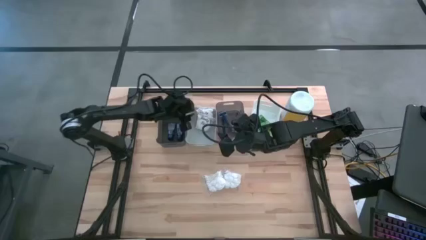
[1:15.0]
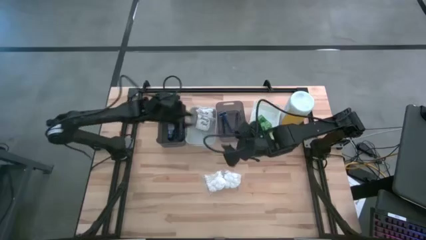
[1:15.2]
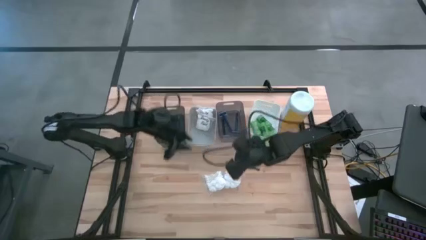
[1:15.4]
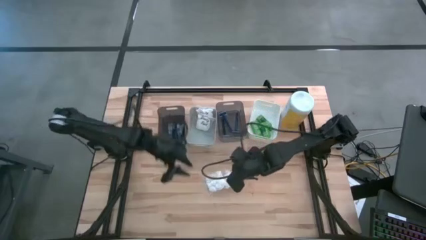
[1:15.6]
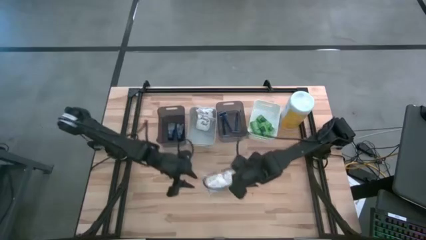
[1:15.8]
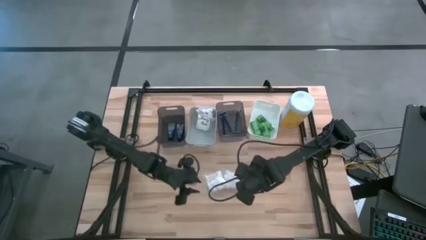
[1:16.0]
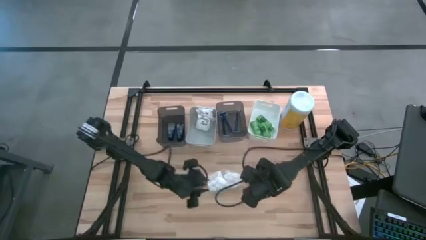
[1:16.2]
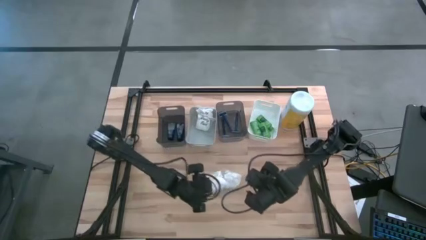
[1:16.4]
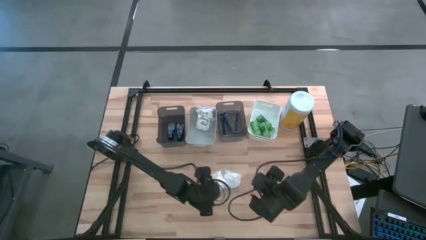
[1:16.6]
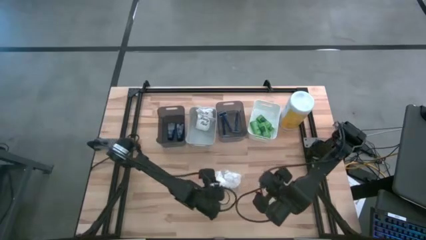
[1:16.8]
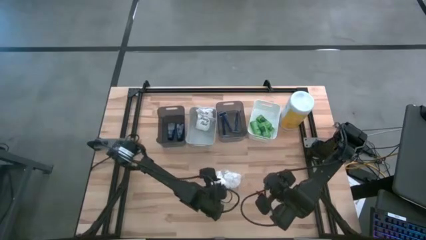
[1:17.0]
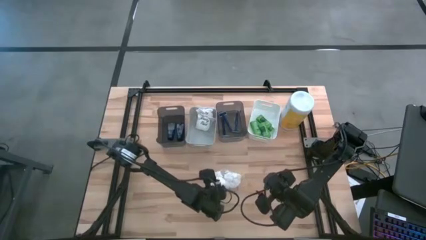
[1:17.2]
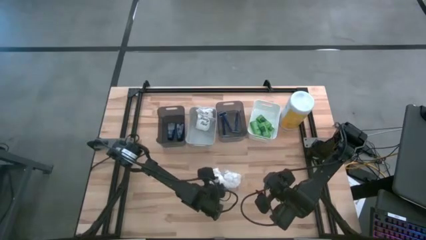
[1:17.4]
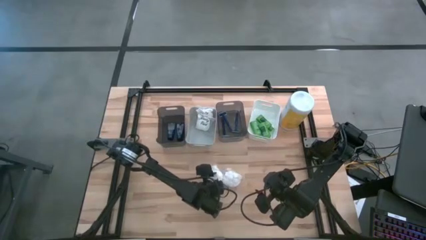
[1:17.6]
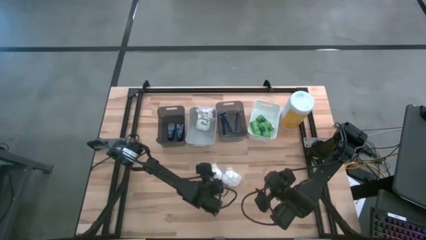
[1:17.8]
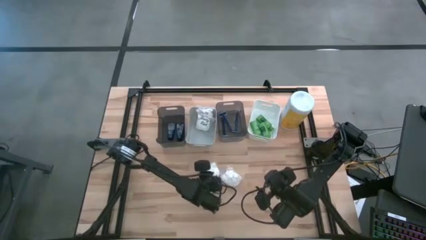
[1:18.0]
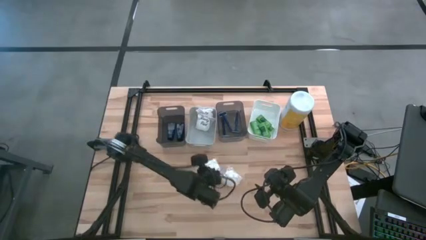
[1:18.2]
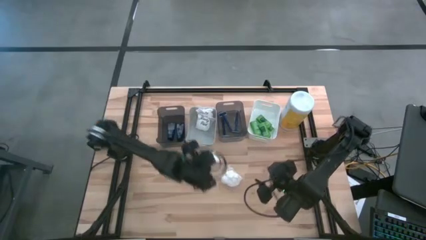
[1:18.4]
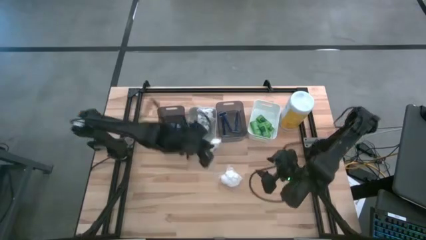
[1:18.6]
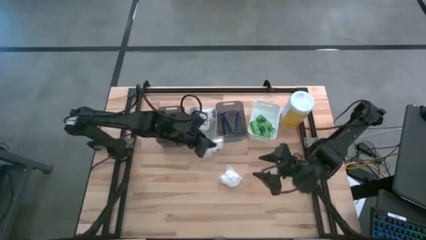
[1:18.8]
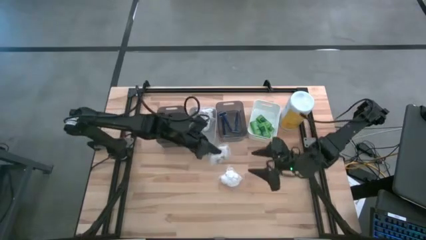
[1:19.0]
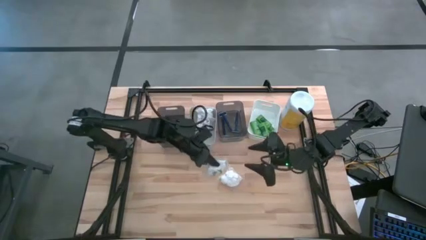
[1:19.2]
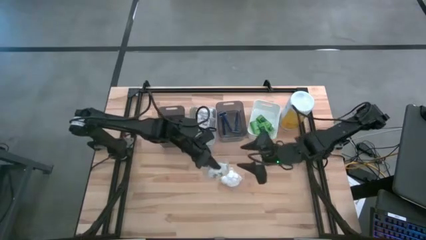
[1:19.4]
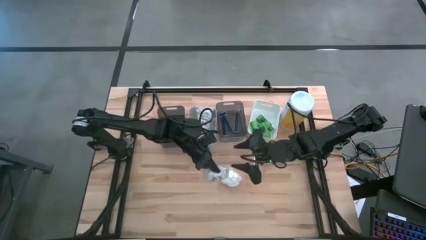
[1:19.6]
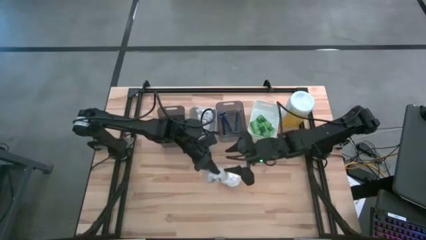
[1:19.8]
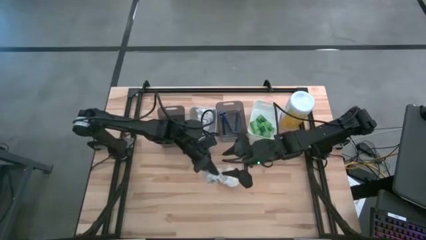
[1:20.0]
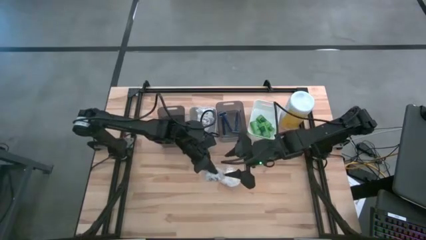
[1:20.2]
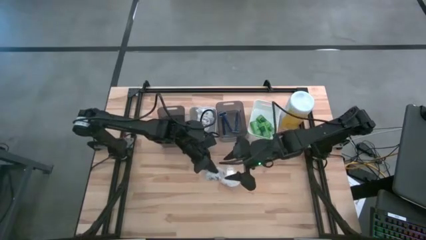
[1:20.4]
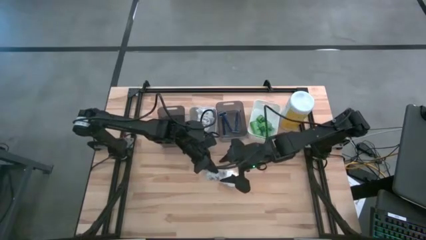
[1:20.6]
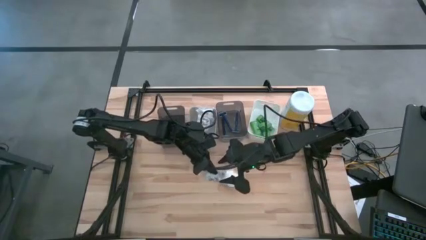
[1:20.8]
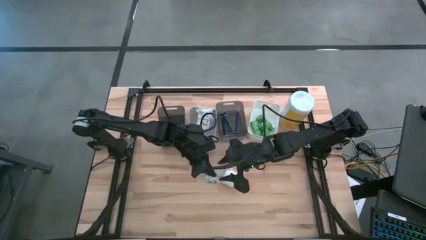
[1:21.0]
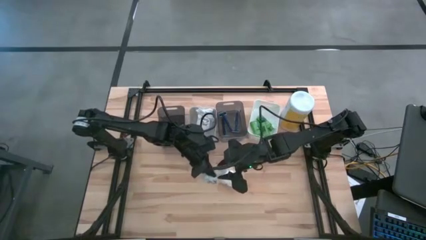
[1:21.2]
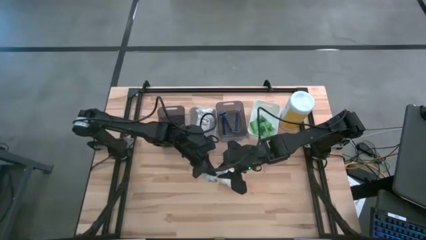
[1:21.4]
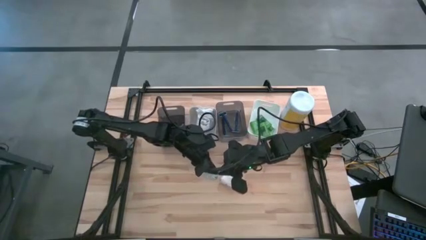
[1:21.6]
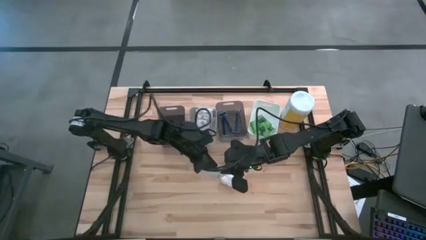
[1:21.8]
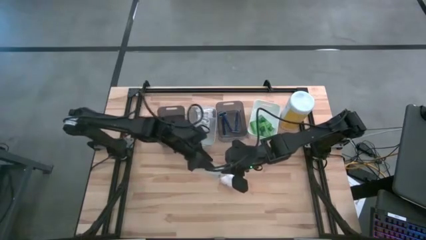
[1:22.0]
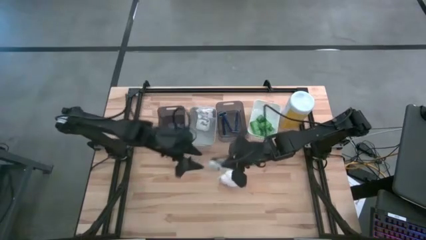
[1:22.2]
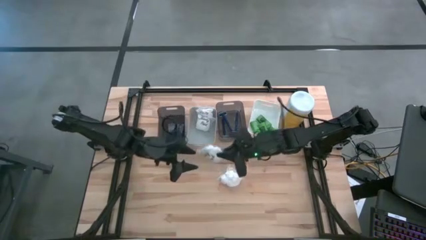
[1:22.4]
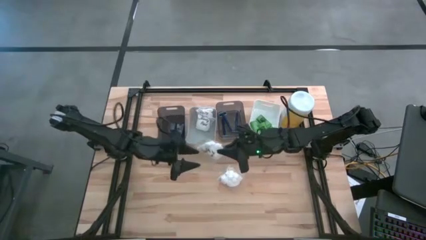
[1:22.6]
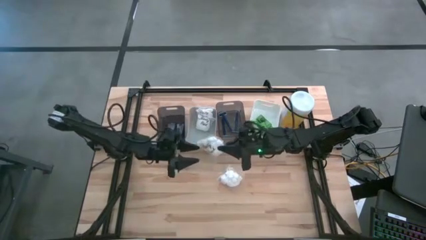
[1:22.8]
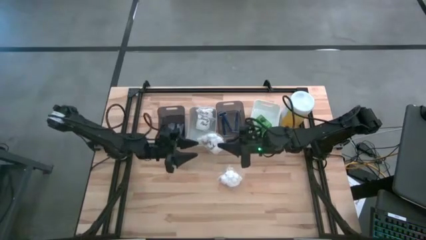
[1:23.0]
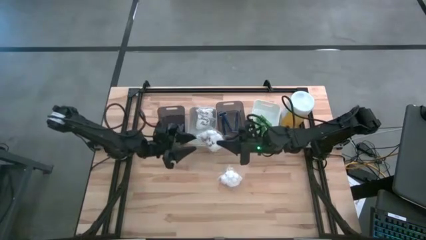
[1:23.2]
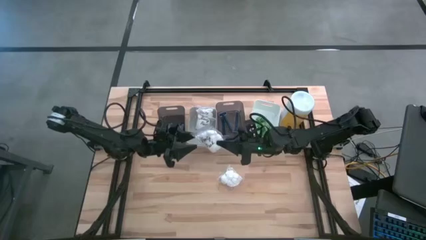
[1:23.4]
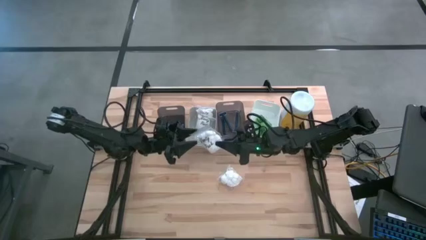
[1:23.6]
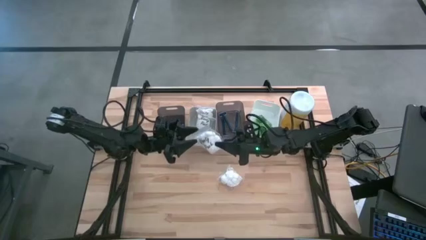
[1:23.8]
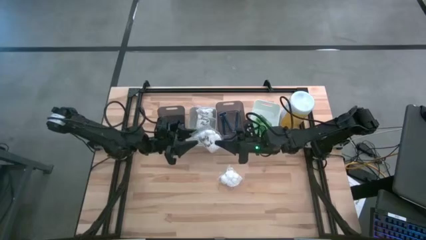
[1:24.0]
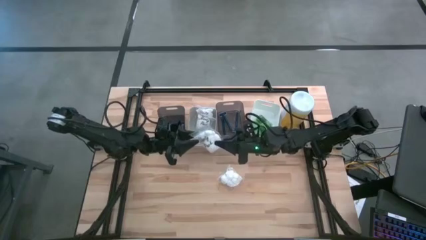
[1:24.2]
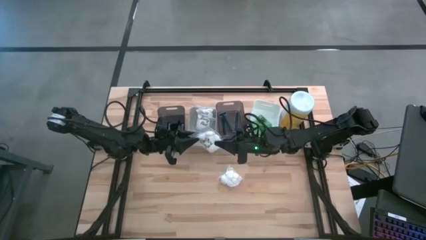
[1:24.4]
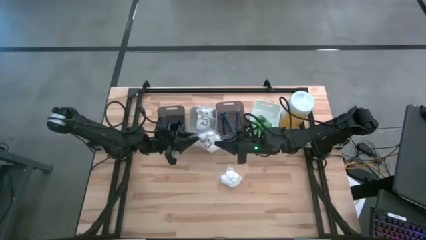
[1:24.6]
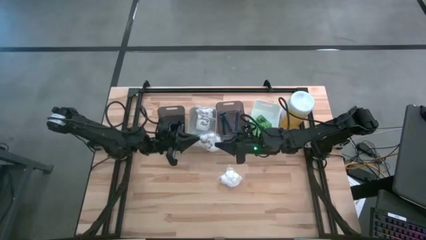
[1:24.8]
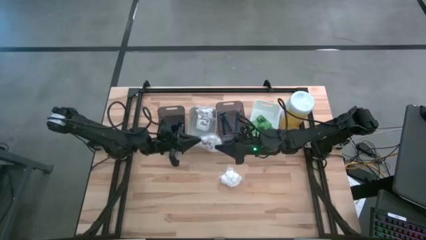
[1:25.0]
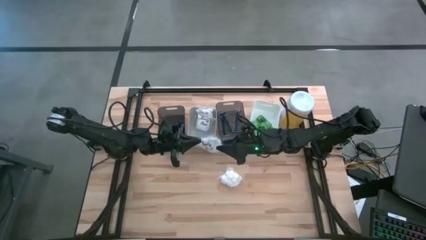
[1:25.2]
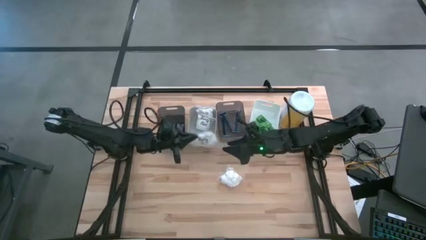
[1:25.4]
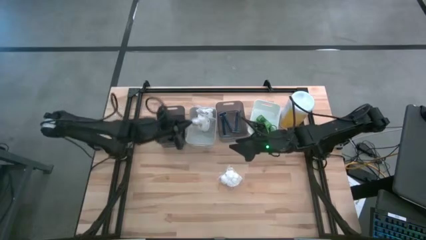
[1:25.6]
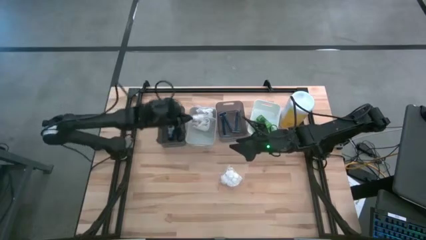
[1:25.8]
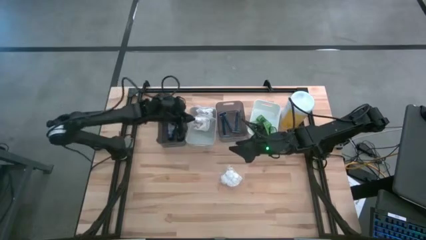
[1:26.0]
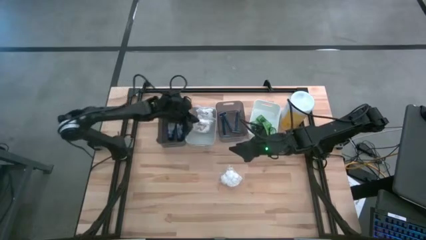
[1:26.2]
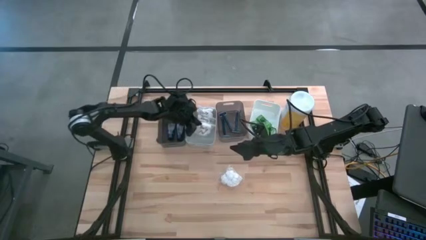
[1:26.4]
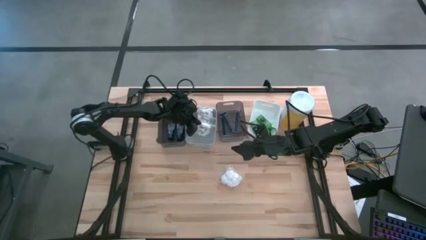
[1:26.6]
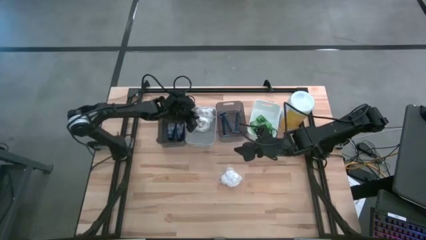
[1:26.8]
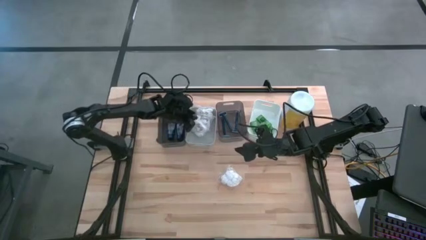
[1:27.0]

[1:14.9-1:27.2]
Task: Pick & Place Travel size toiletries
Put the white cotton pack into the gray bin

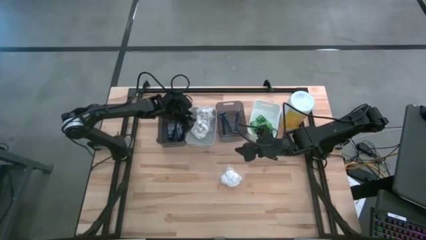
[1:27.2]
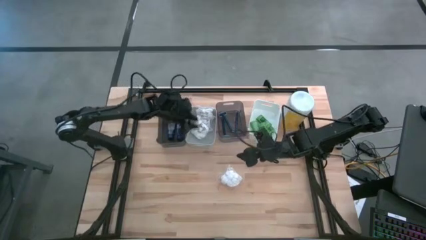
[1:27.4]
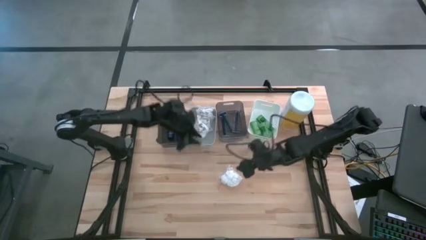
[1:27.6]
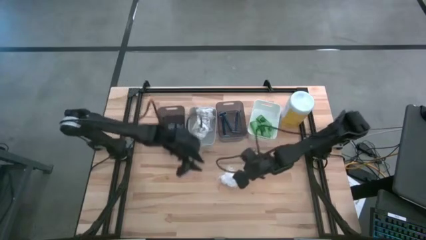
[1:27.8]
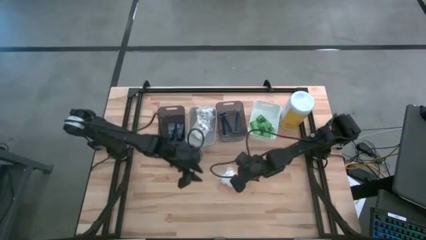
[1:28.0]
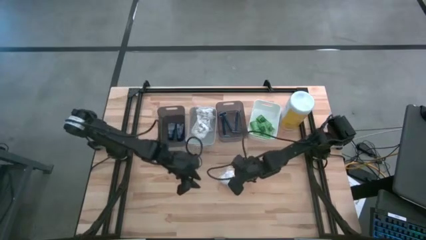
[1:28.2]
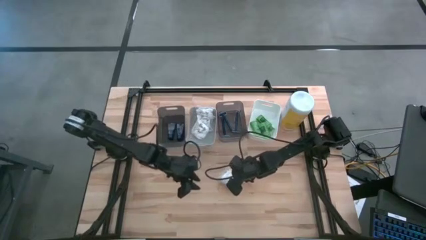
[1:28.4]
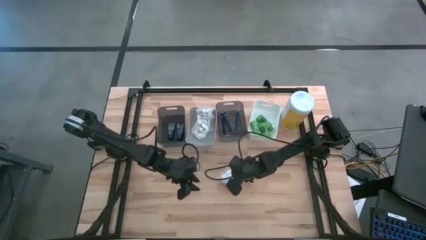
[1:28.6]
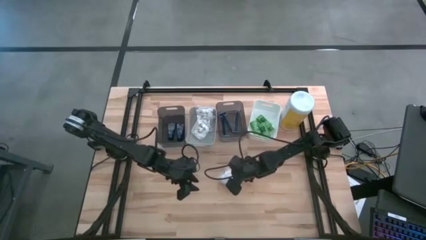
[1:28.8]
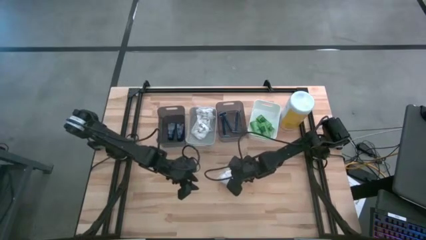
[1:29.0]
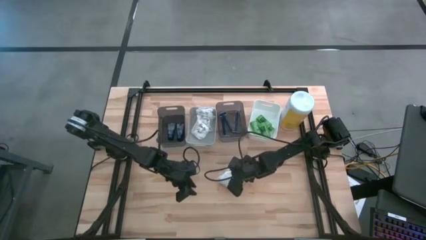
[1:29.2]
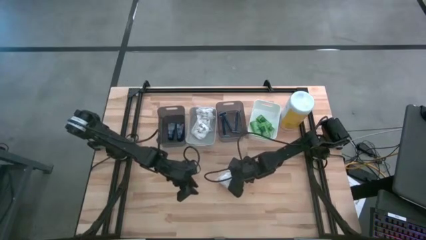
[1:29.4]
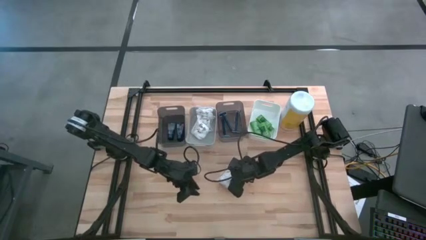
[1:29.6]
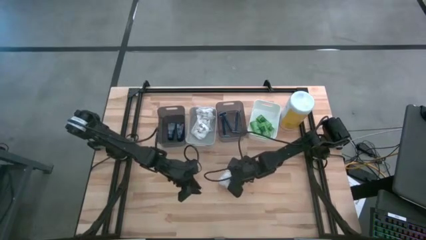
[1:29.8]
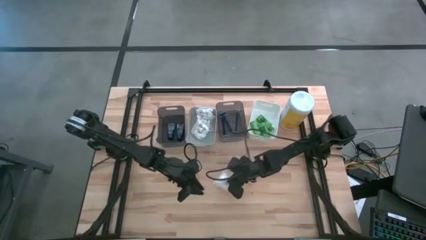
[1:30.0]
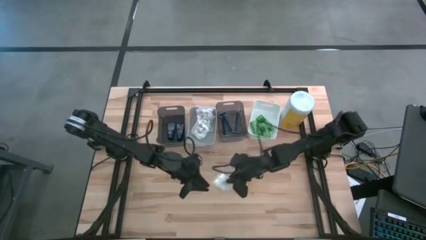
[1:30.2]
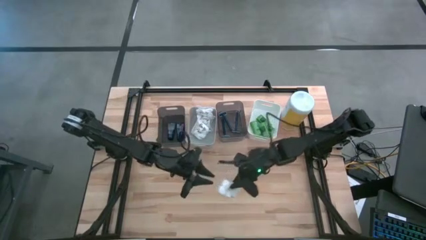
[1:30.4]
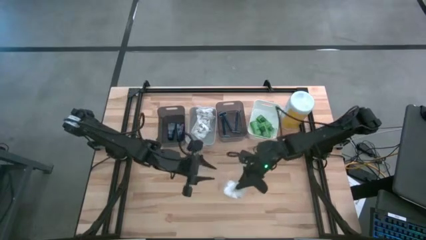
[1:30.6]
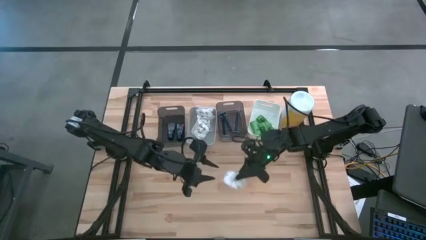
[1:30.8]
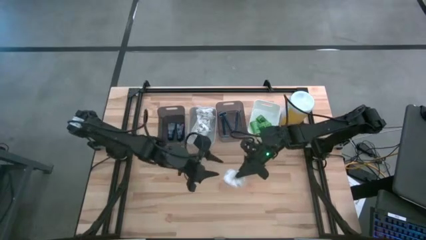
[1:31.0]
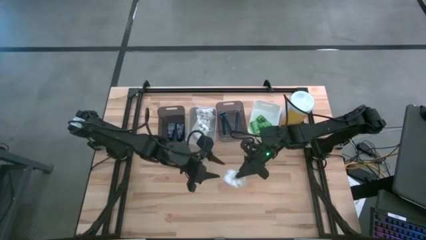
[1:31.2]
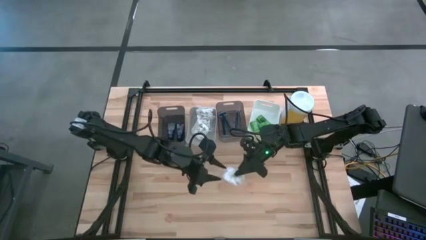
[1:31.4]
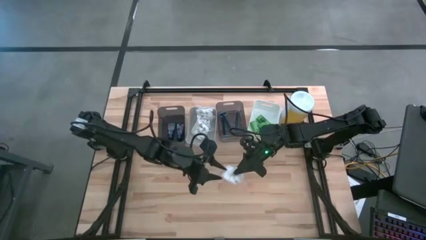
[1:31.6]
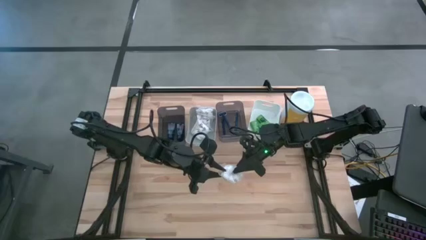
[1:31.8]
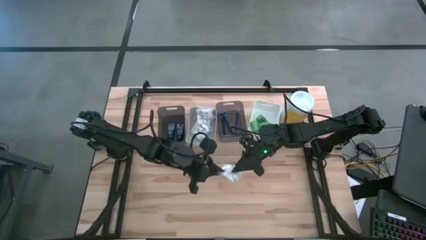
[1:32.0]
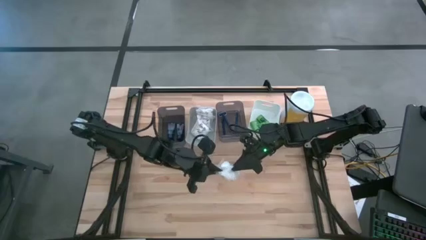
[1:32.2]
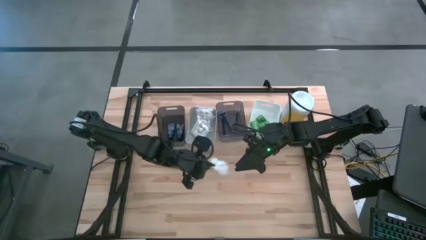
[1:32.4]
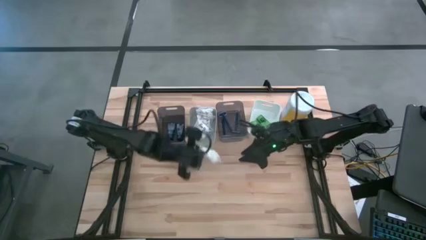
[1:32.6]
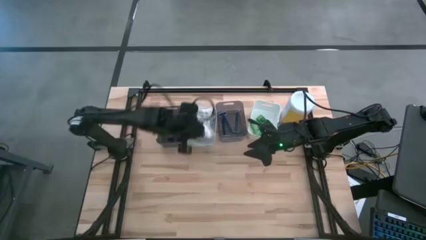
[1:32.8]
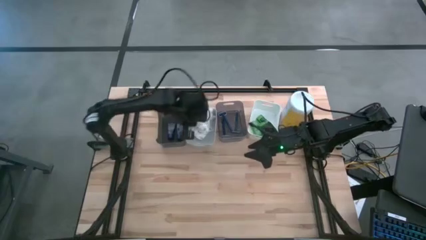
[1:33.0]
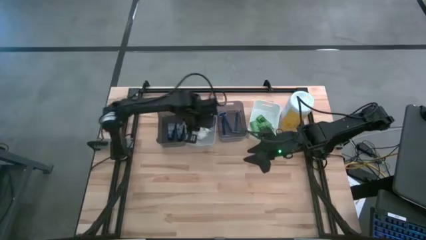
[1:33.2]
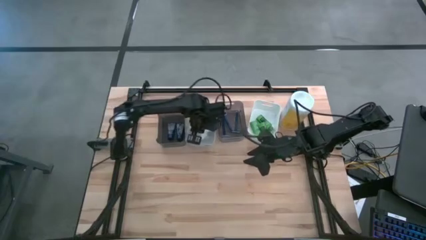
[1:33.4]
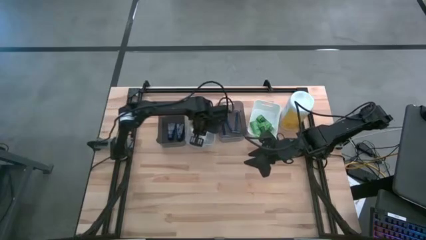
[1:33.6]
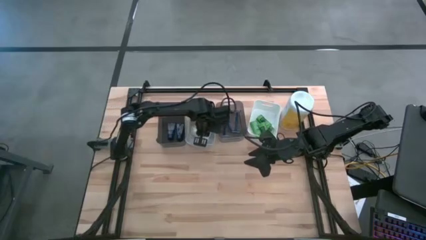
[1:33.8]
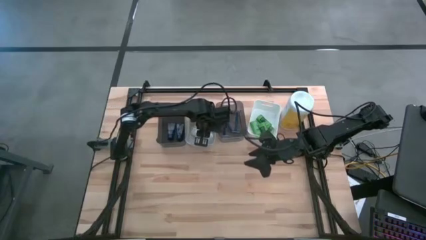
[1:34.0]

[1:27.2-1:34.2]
Put the white cotton pack into the gray bin
